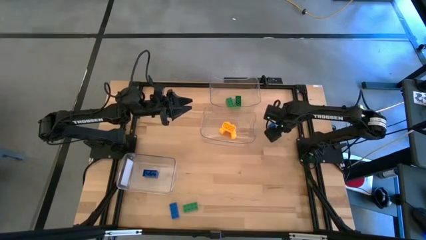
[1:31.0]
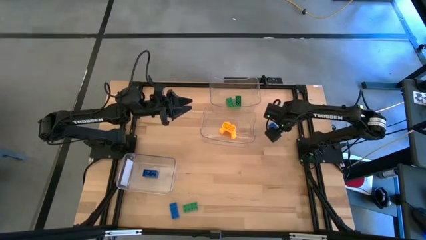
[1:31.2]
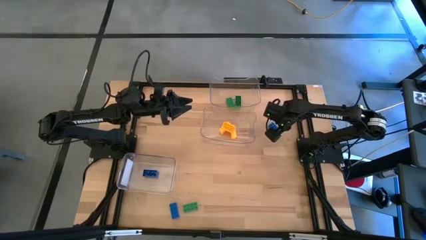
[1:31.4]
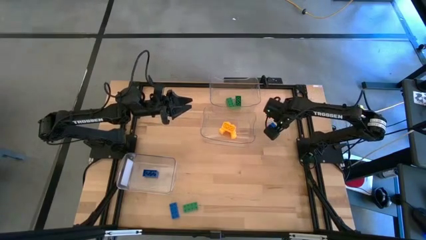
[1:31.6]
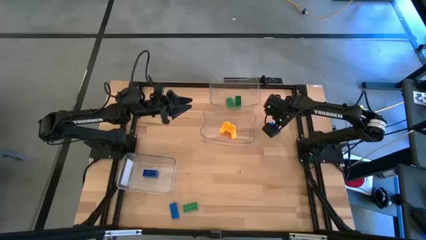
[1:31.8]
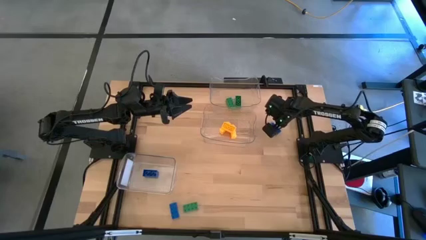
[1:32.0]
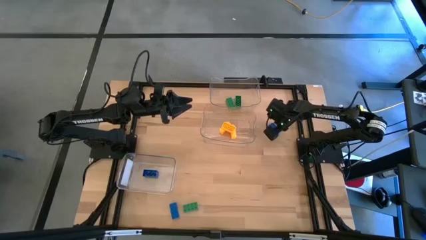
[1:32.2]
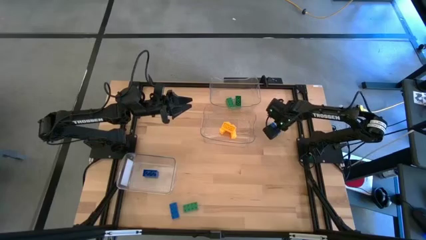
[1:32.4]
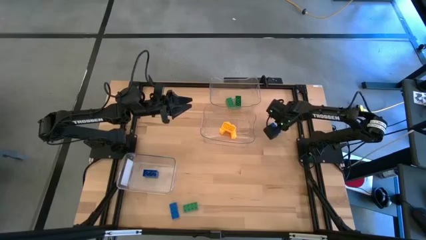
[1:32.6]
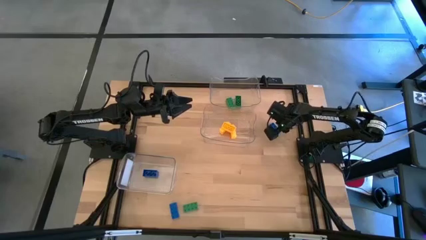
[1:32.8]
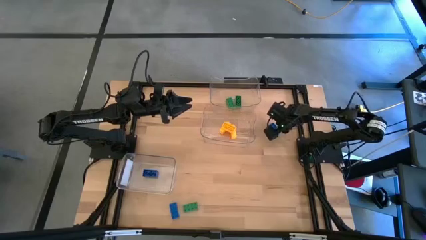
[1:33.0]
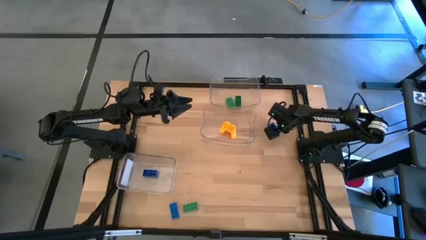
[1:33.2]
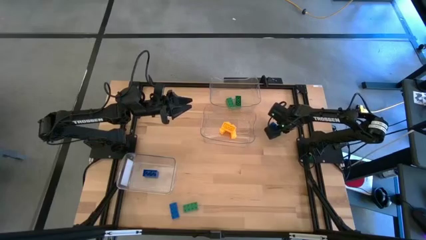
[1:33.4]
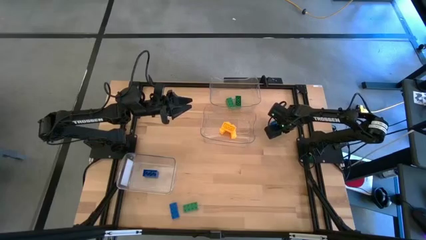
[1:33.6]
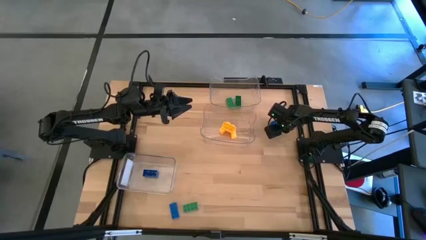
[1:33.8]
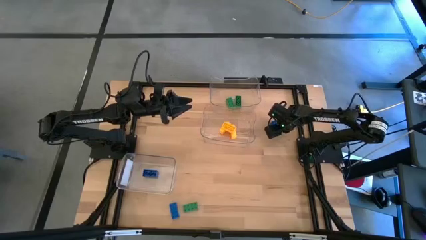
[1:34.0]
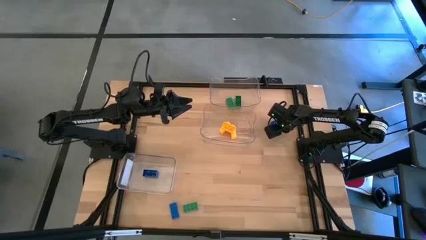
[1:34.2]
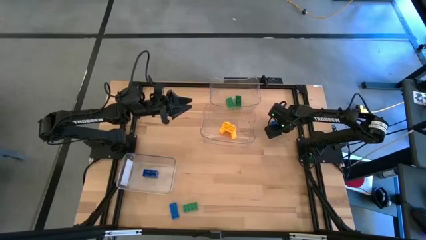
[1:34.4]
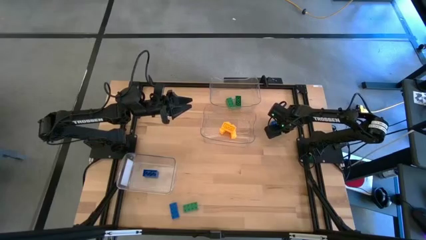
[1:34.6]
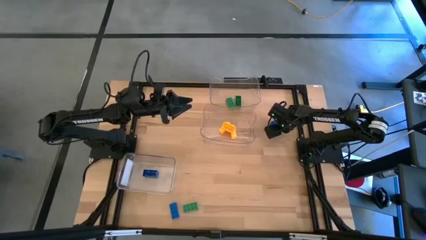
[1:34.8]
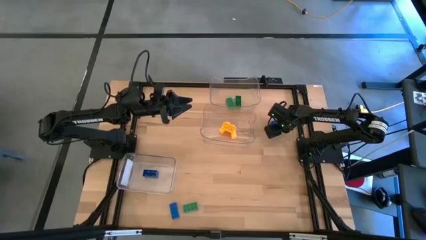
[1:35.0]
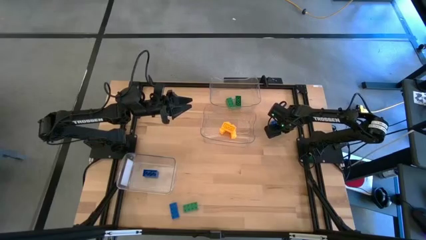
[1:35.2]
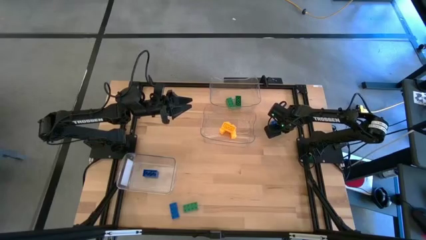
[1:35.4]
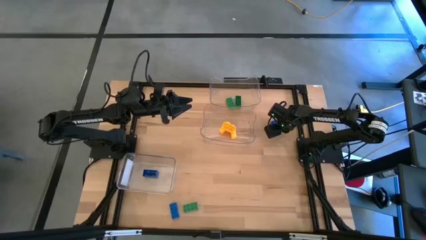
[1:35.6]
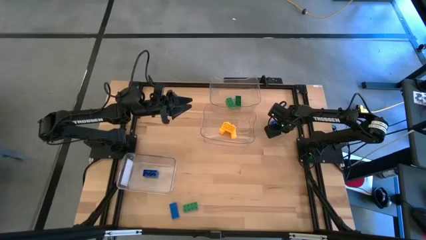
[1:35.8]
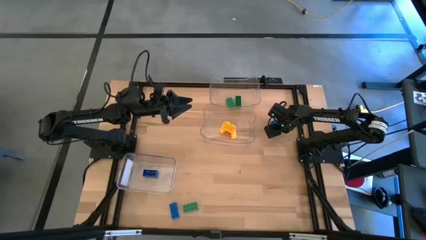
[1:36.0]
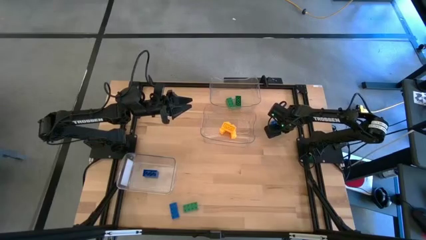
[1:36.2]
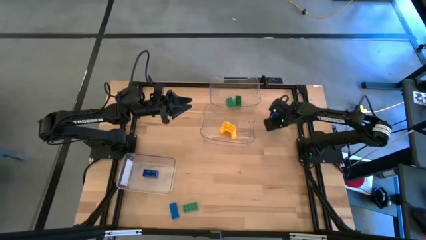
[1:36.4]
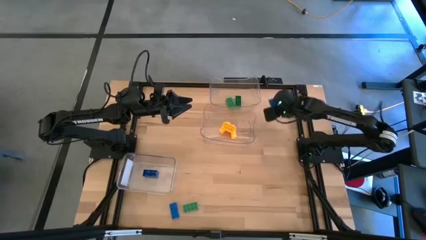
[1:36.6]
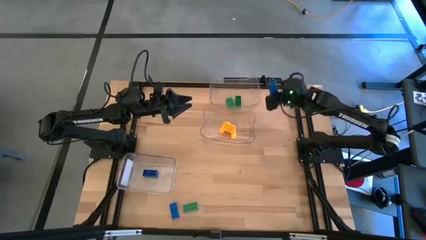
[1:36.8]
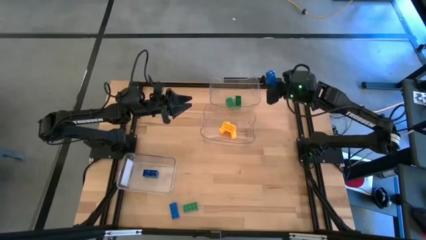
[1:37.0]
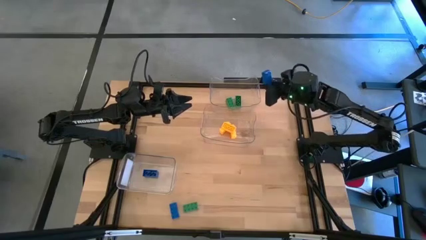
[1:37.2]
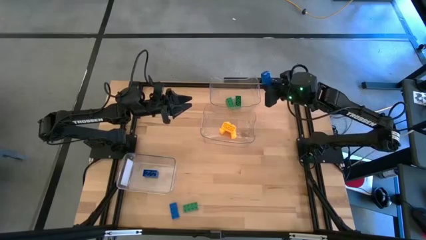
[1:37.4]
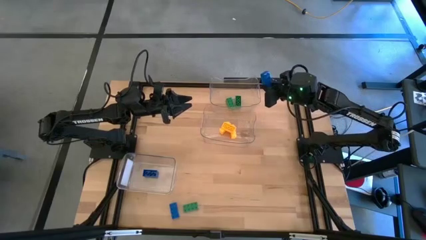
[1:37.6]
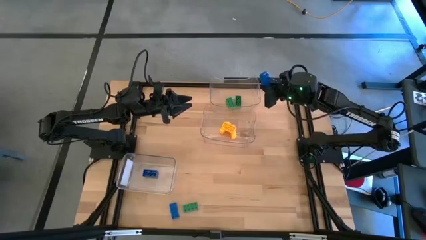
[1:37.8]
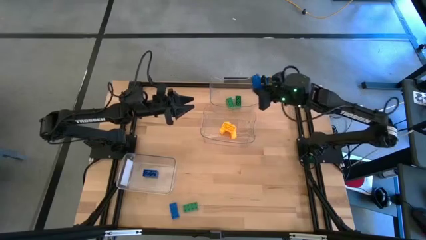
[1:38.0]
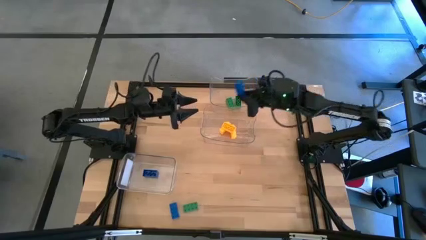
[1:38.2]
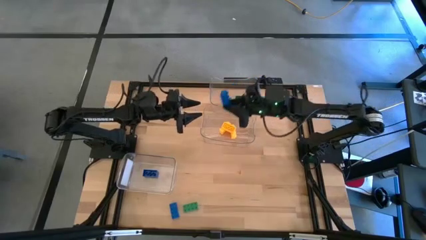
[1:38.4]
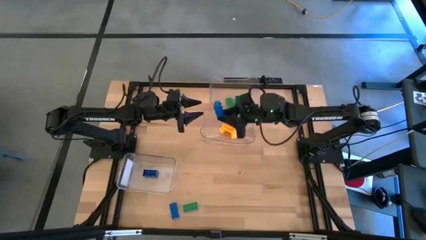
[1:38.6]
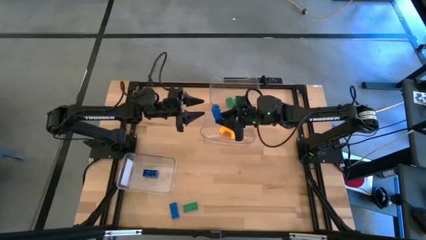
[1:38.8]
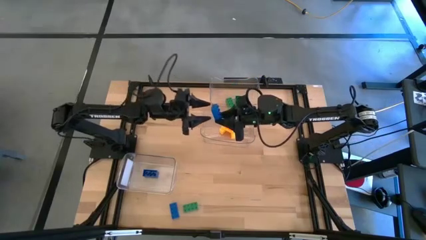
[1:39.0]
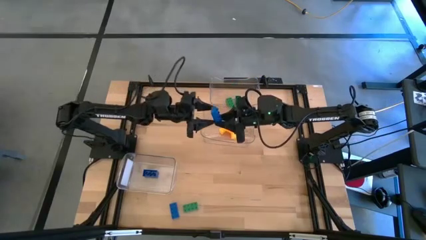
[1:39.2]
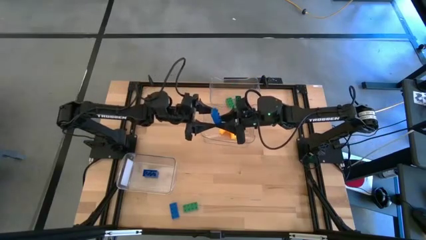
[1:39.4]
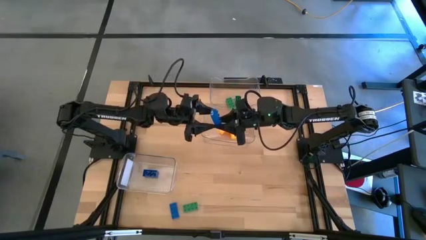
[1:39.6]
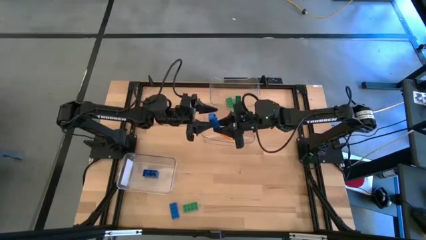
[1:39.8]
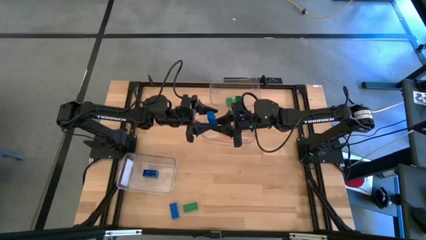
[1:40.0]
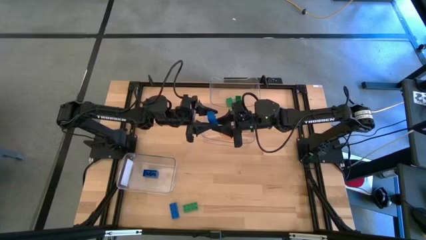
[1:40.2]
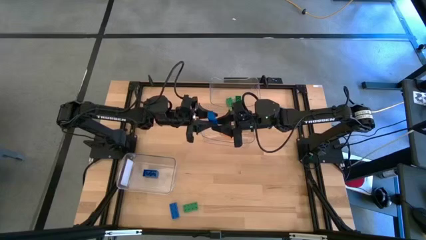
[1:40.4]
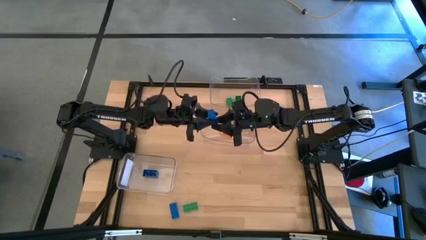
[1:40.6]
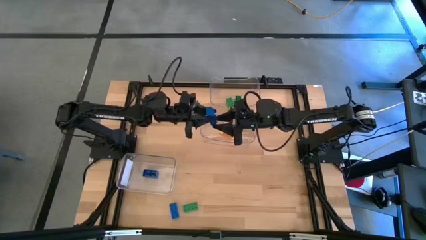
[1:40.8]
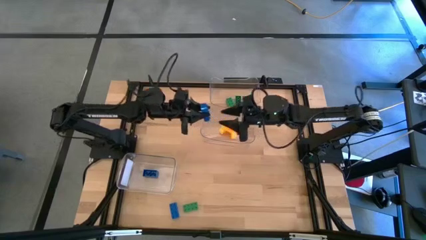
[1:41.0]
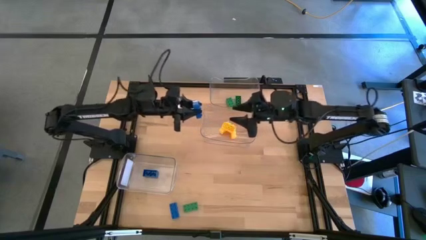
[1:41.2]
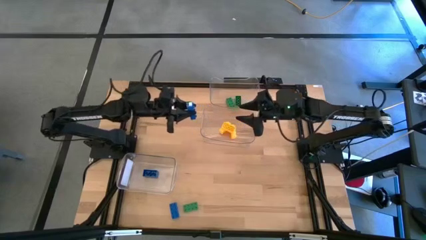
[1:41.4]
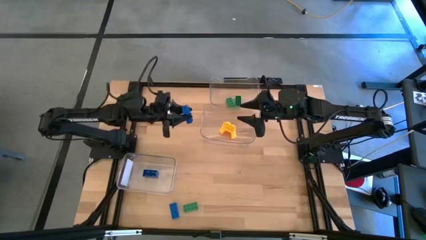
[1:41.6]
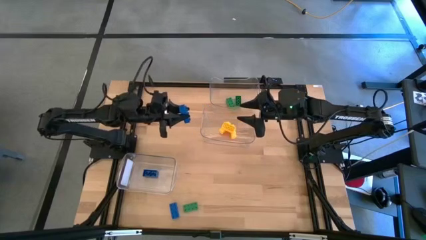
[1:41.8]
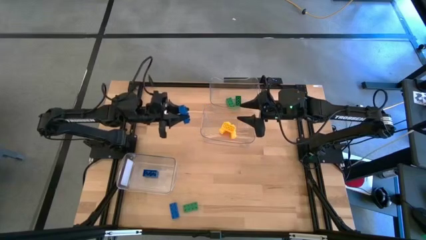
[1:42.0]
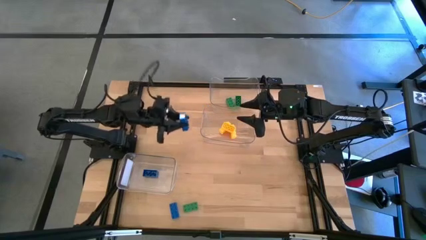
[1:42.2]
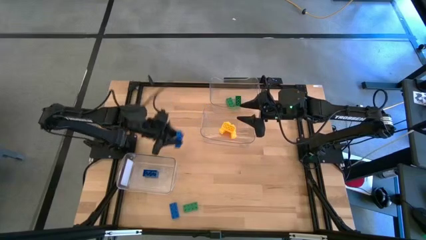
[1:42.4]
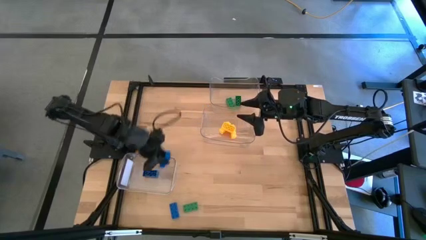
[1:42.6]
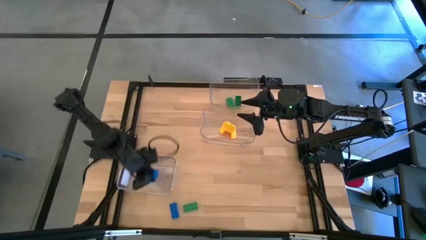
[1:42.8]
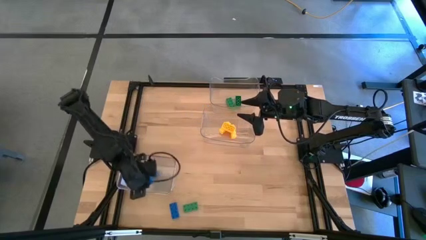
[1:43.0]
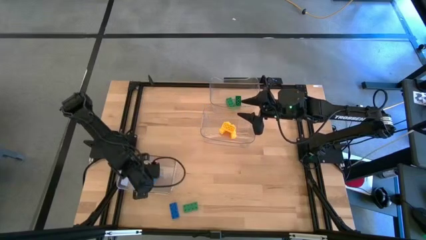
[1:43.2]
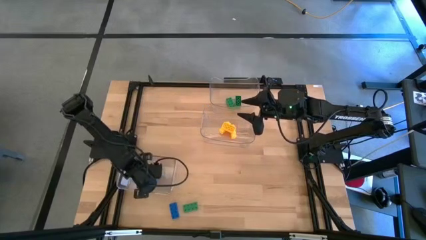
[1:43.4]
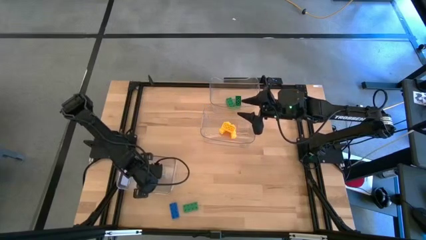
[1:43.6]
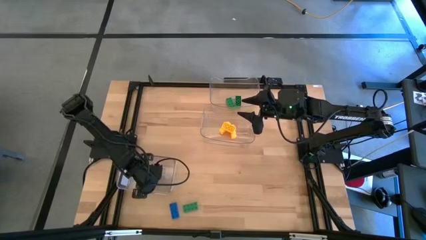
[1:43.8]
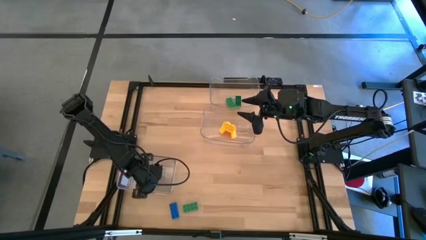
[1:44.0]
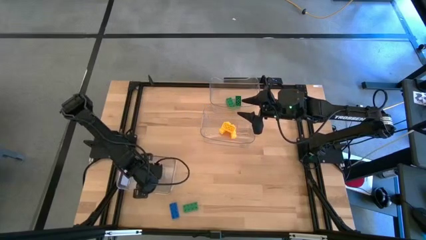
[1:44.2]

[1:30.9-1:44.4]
Task: Sort & place blocks by color
Put the top blue game piece into the bottom bottom transparent bin
